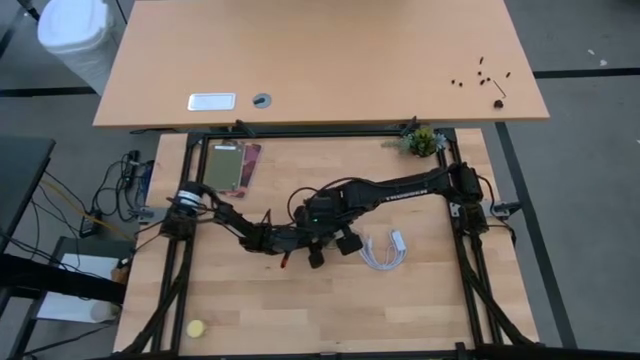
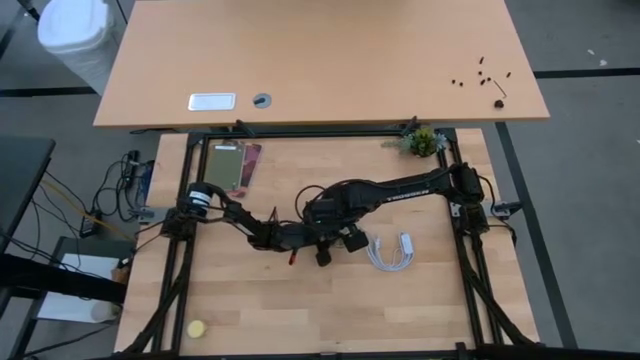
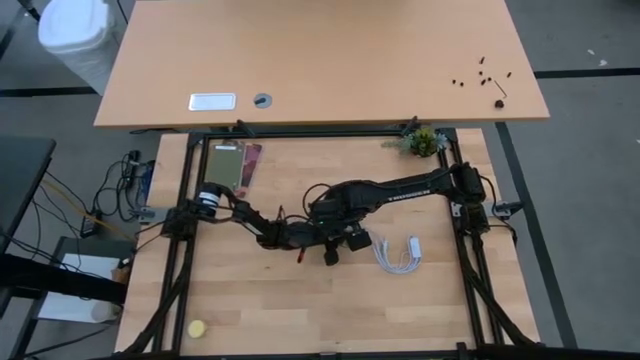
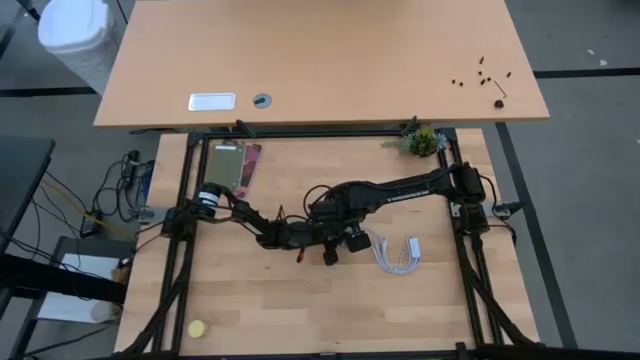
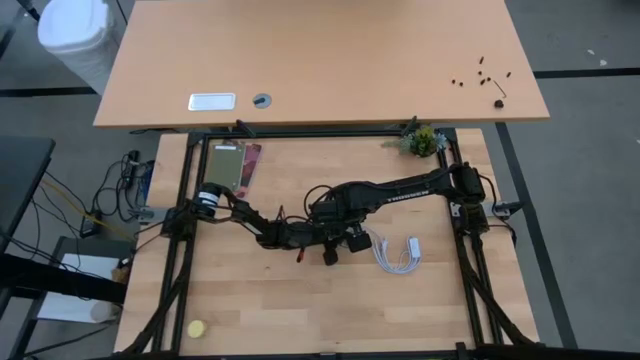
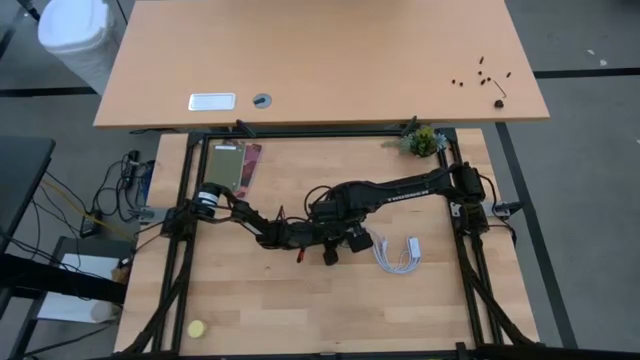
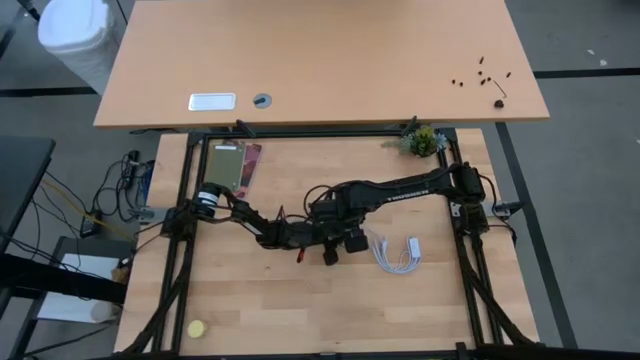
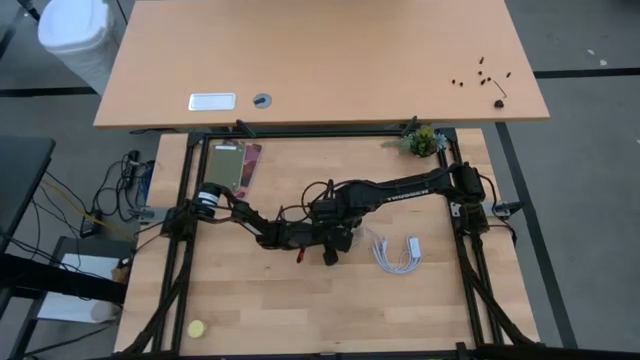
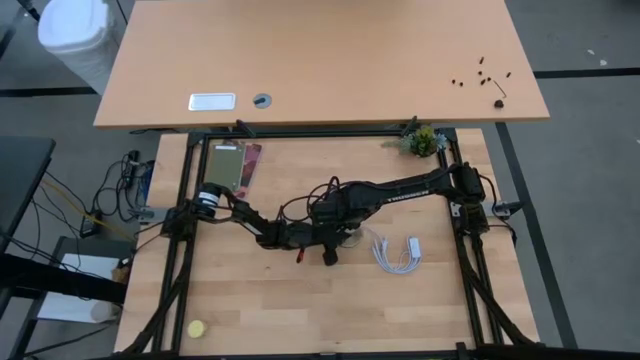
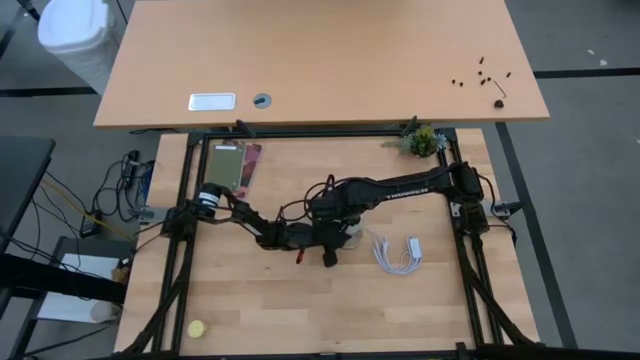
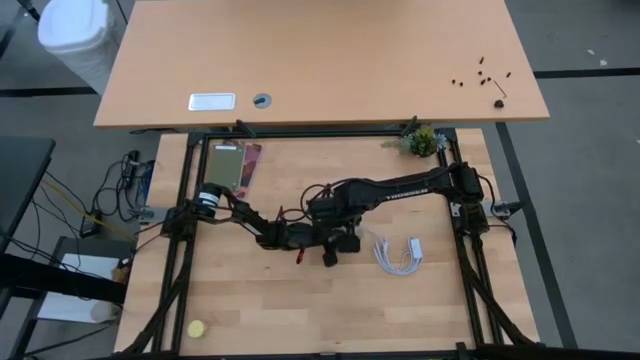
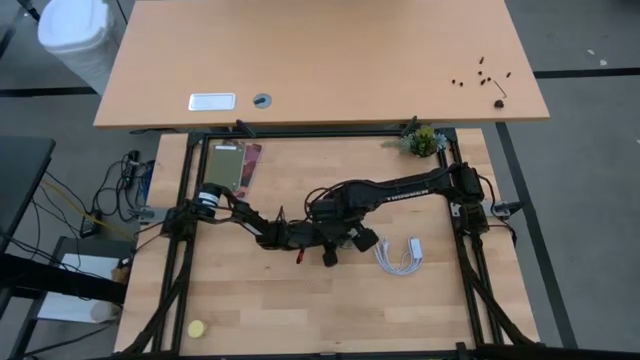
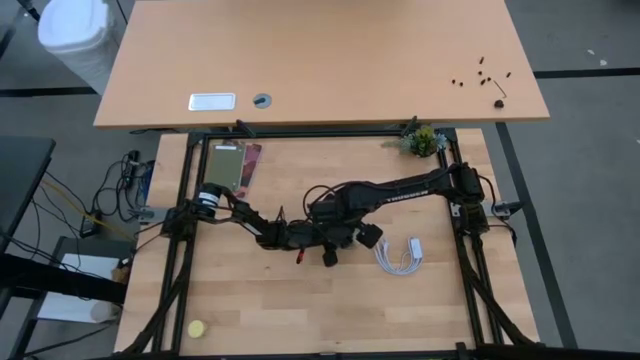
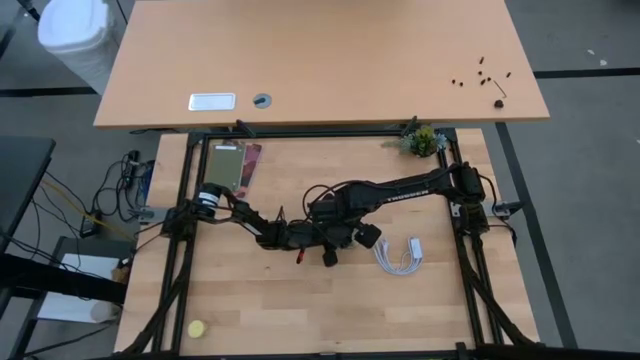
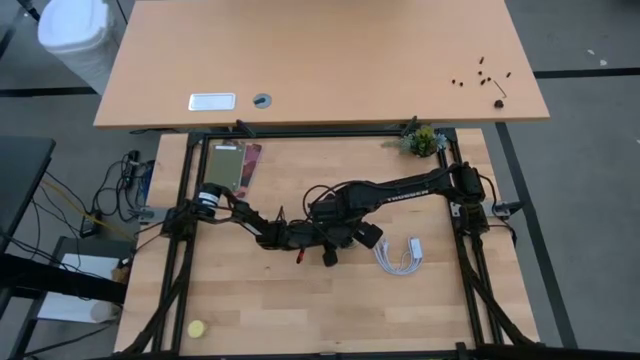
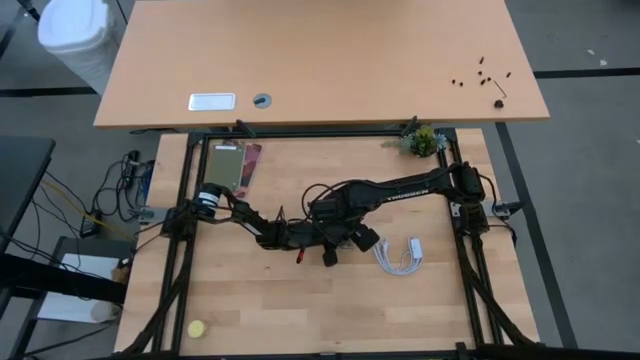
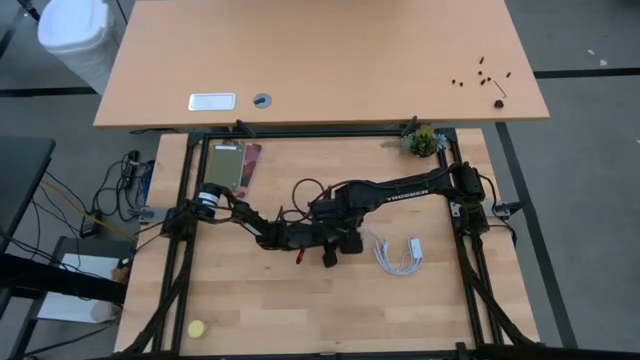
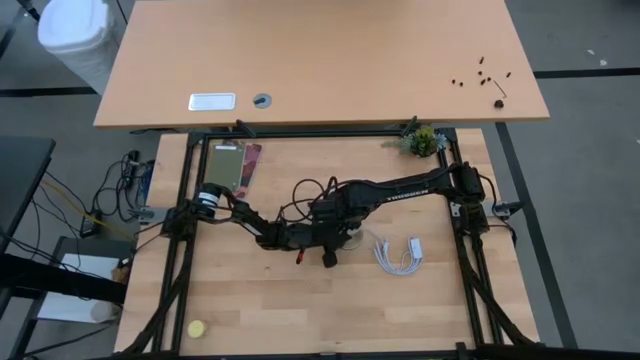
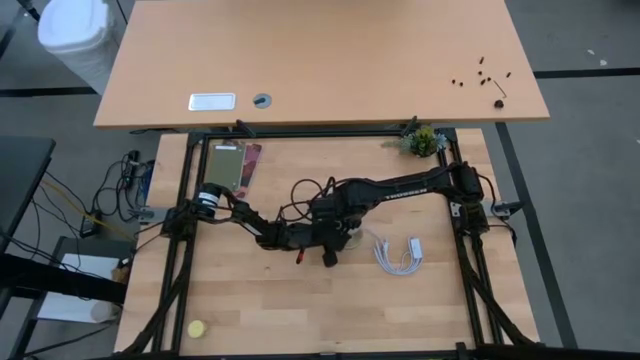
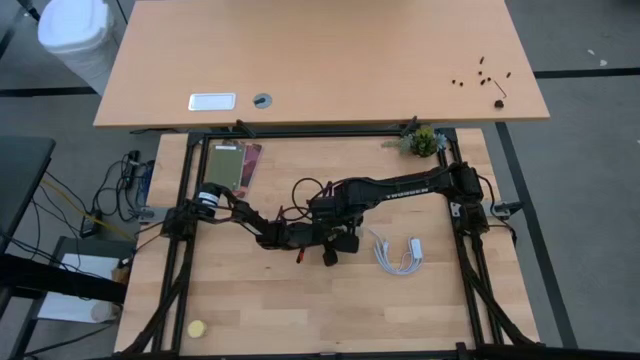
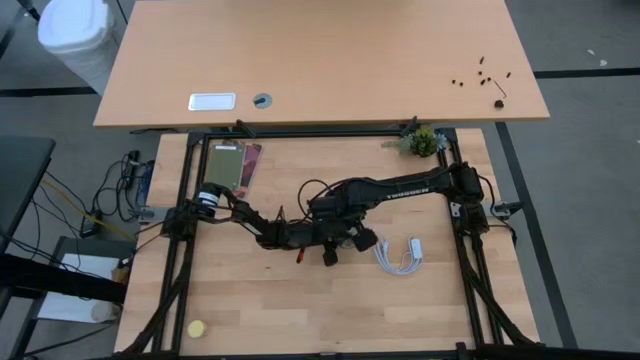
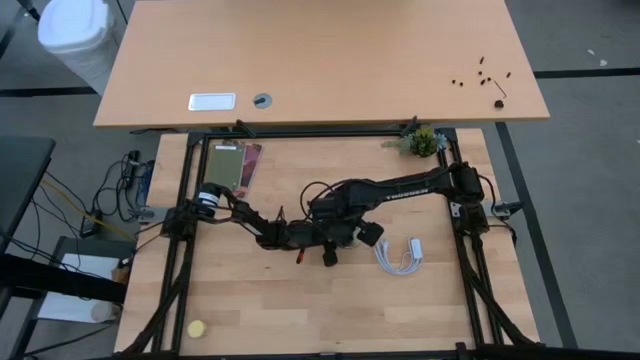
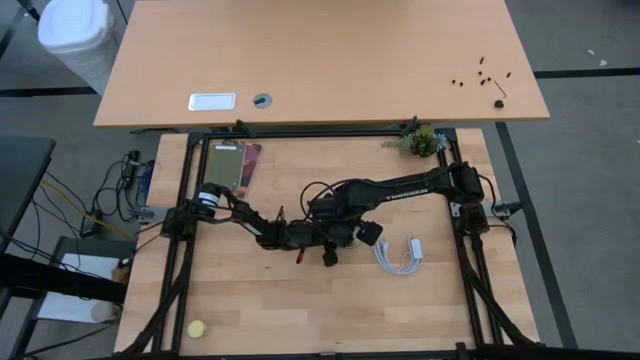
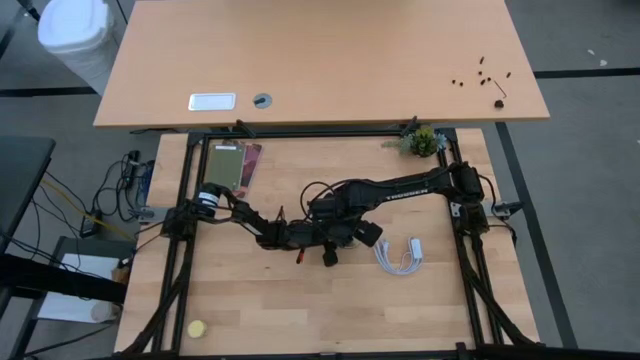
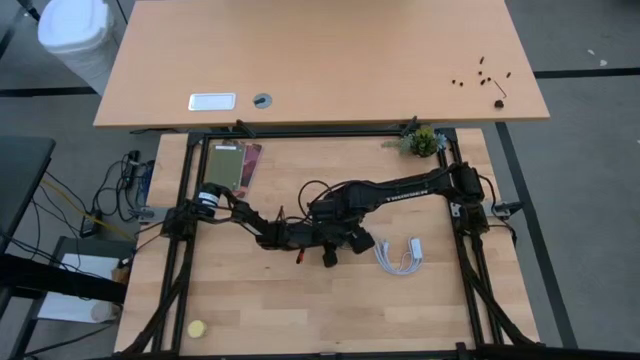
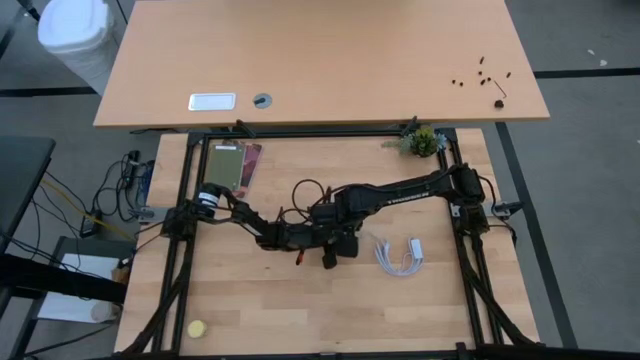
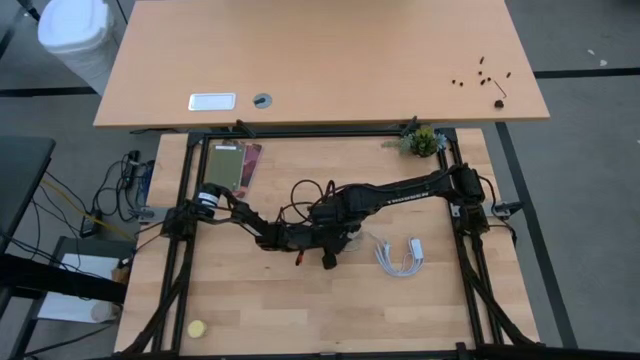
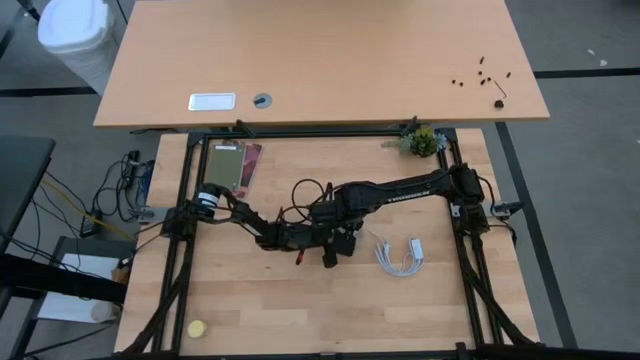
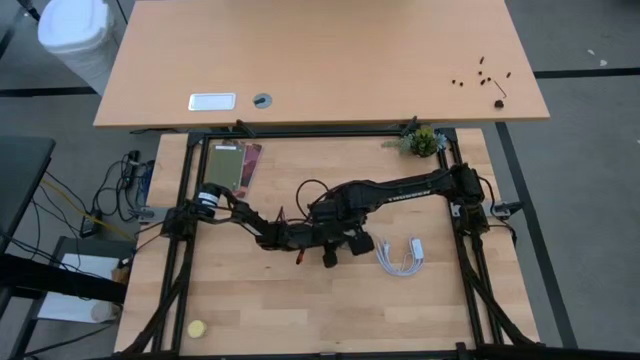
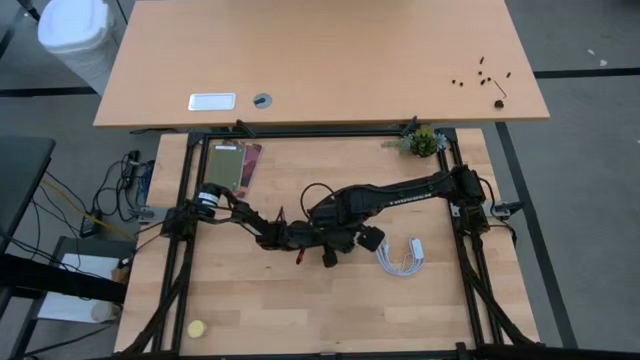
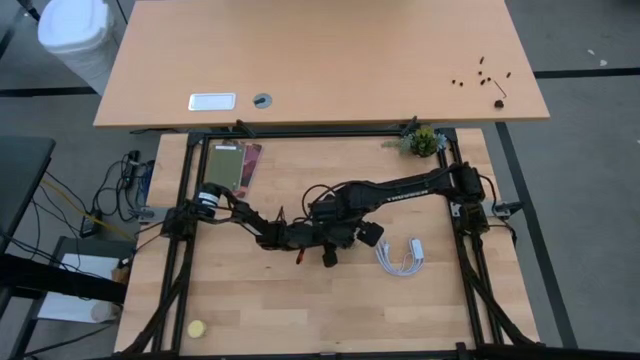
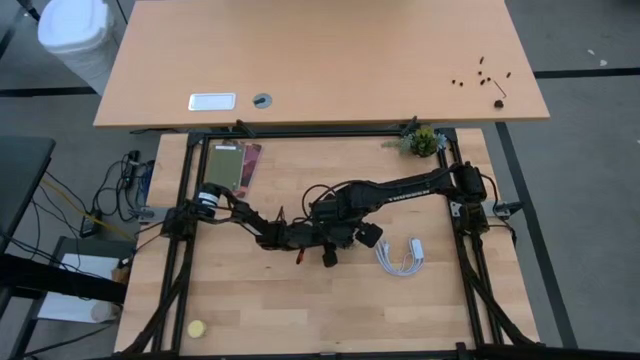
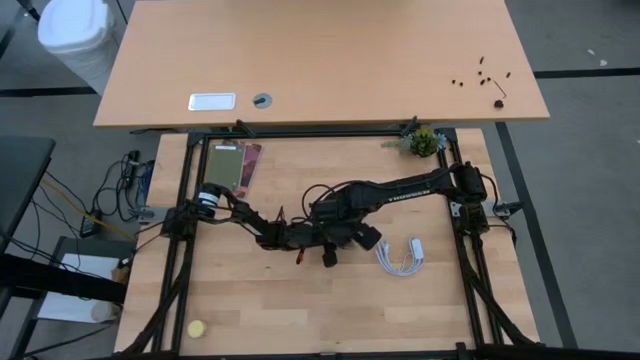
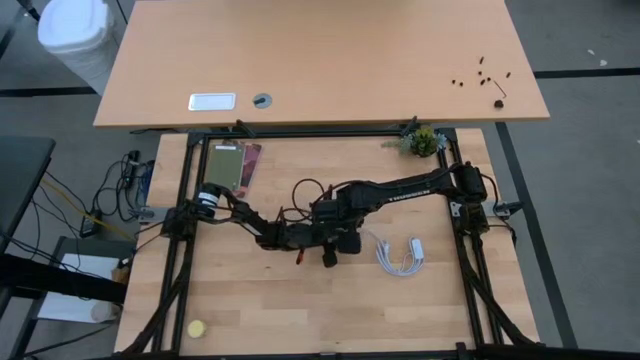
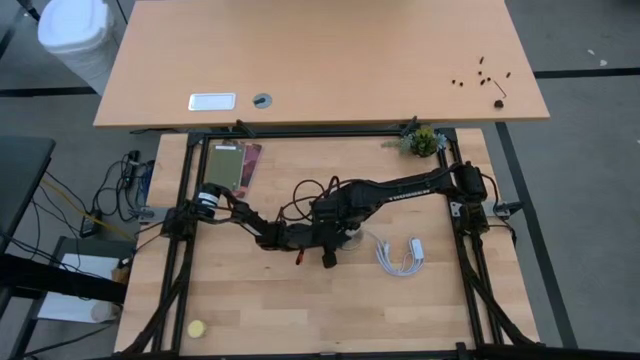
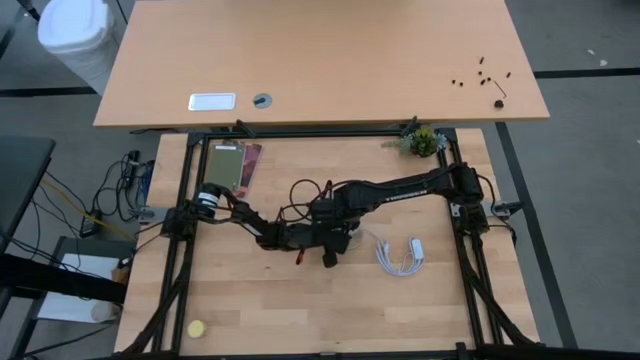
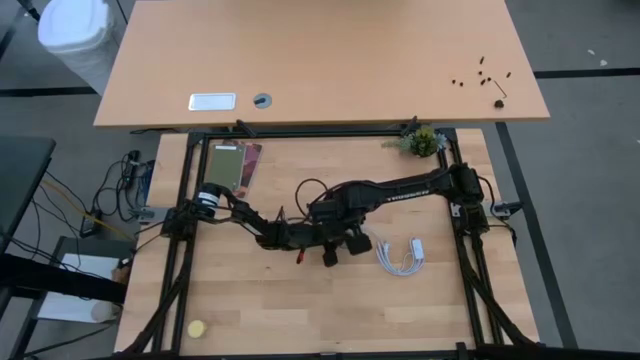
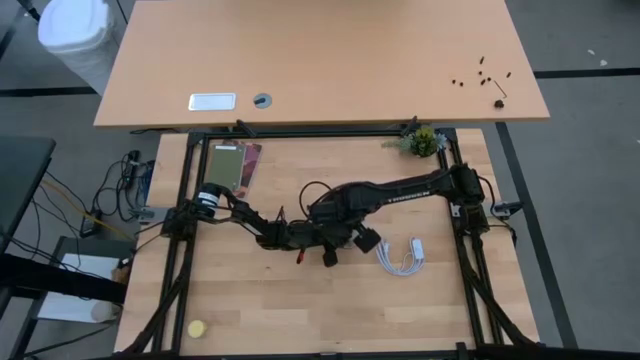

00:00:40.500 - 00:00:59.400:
Task: Screw lightbulb
Insert the white lightbulb into the desk lamp

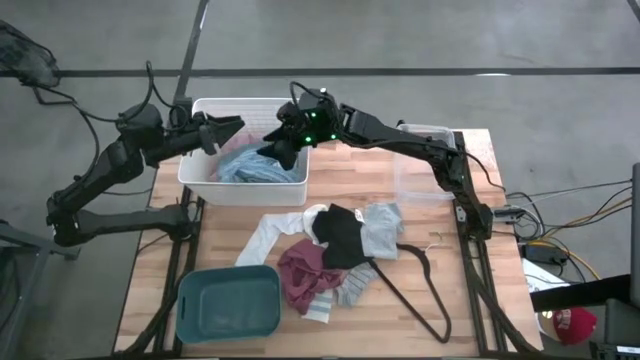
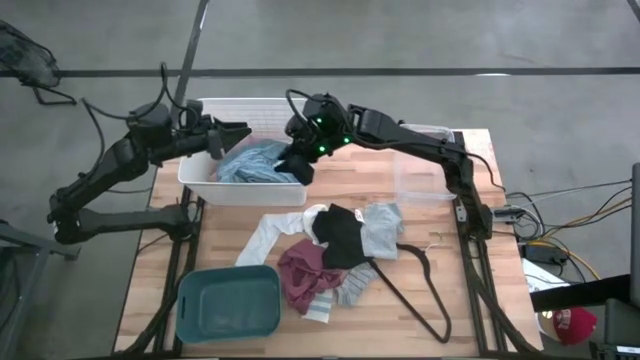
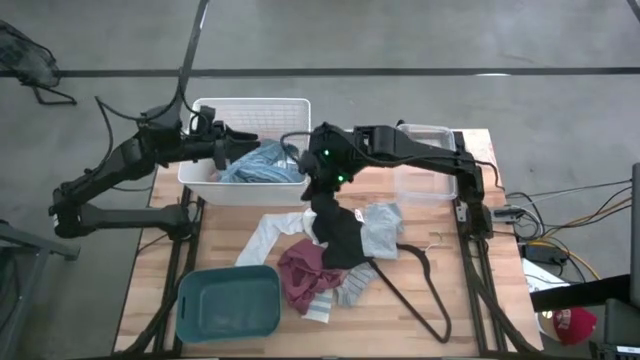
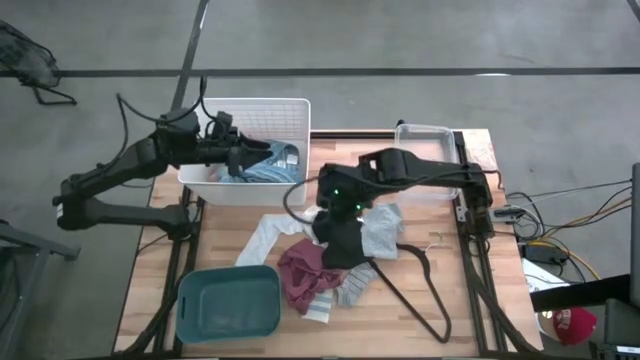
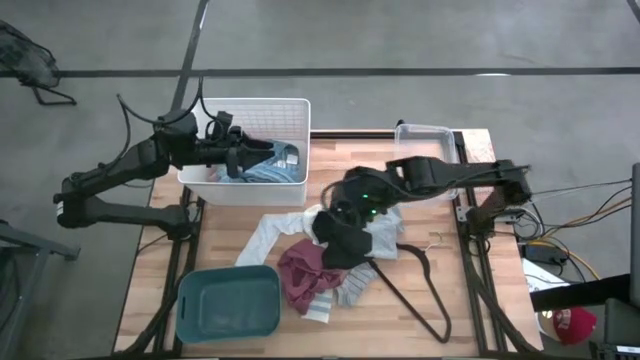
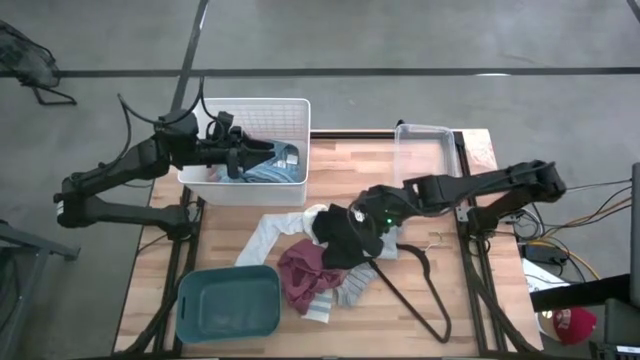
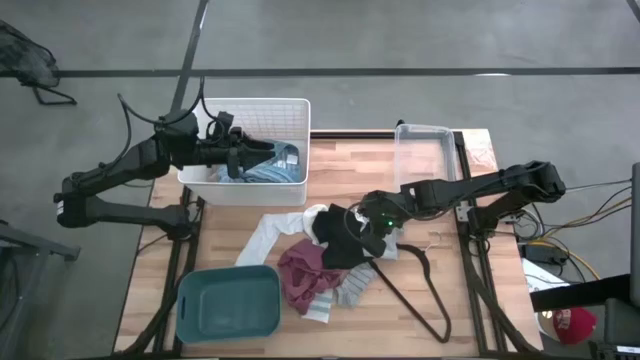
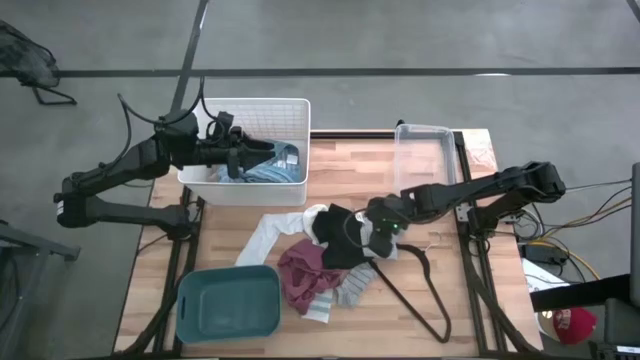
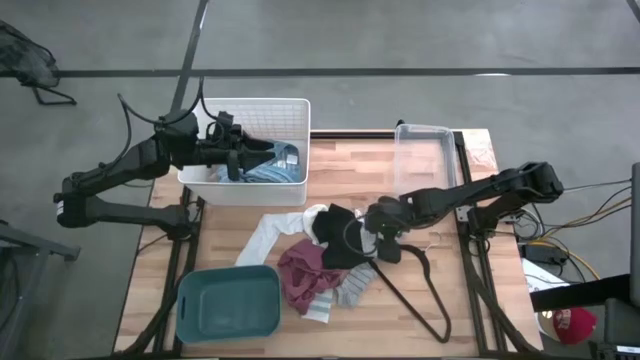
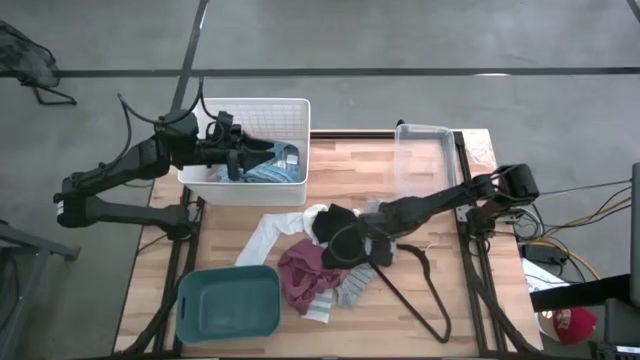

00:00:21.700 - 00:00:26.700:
Task: Pick & Place Cloths
Put the gray boxers into the transparent bin
